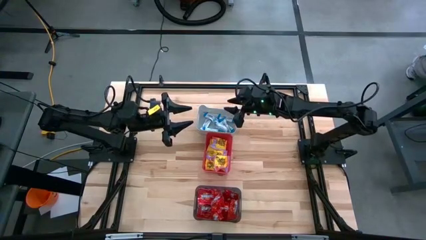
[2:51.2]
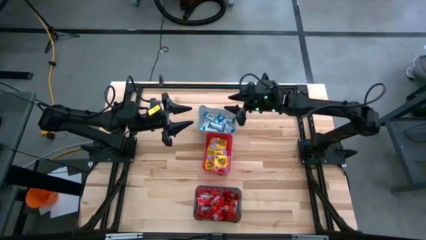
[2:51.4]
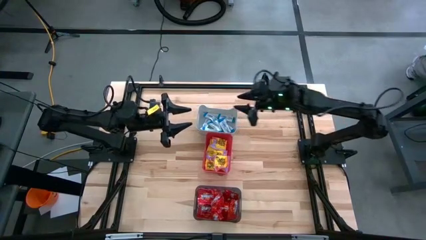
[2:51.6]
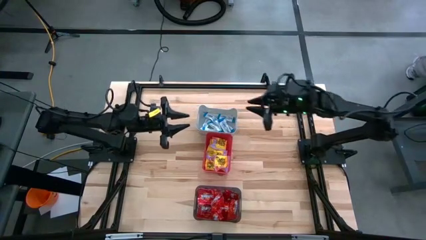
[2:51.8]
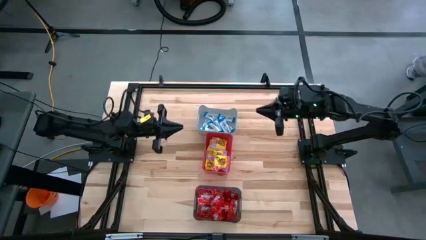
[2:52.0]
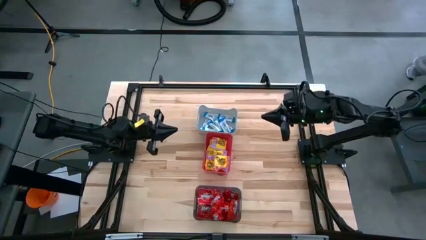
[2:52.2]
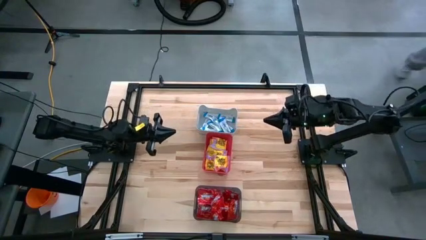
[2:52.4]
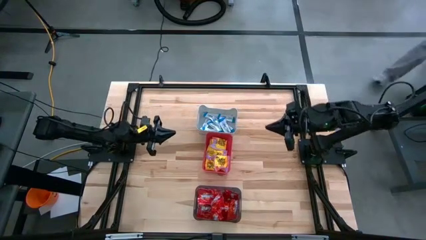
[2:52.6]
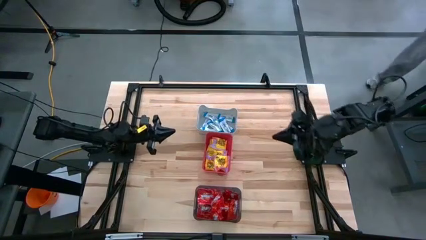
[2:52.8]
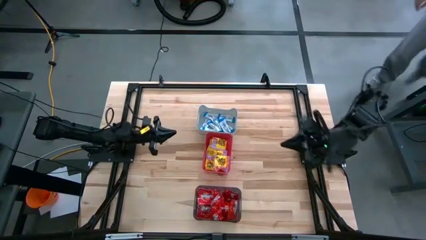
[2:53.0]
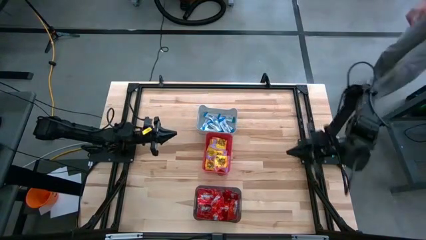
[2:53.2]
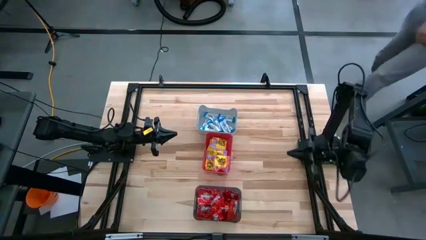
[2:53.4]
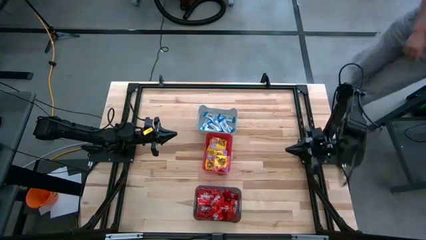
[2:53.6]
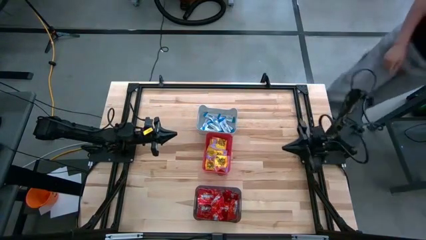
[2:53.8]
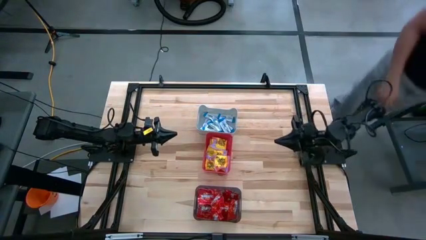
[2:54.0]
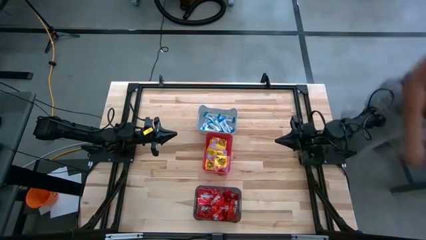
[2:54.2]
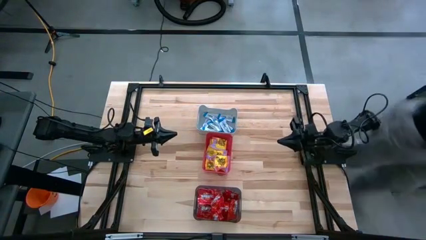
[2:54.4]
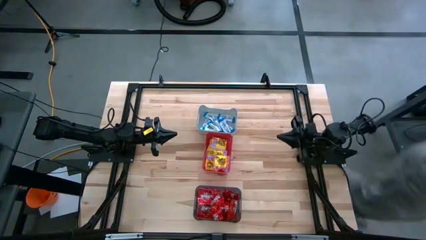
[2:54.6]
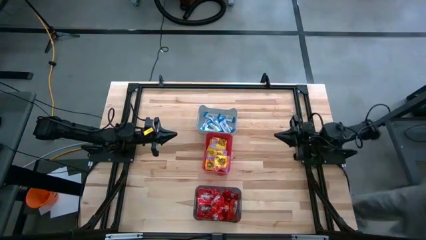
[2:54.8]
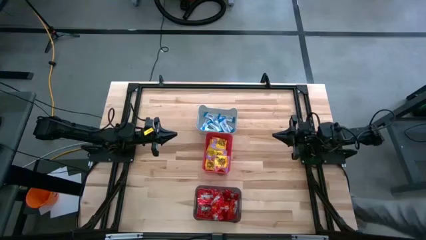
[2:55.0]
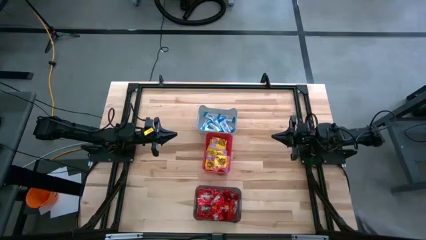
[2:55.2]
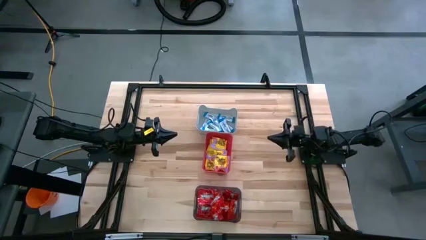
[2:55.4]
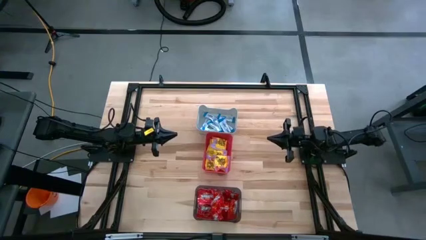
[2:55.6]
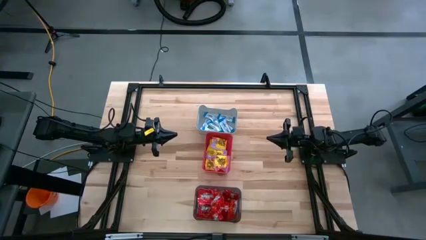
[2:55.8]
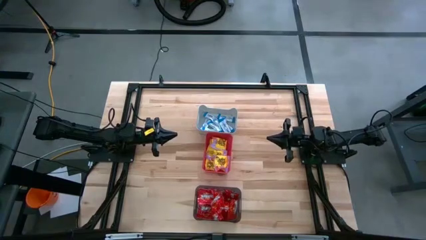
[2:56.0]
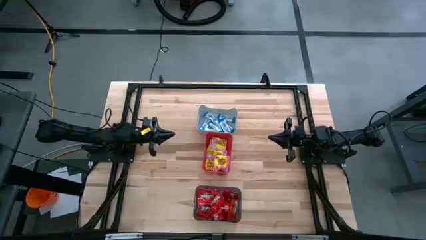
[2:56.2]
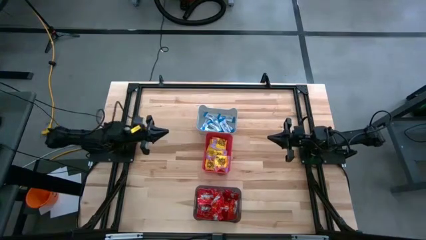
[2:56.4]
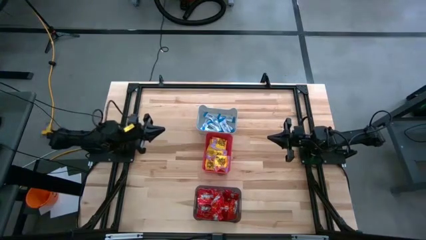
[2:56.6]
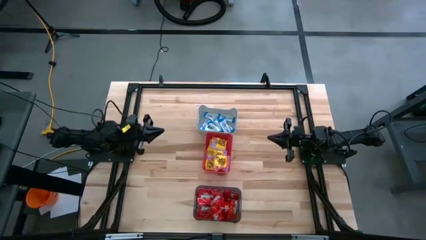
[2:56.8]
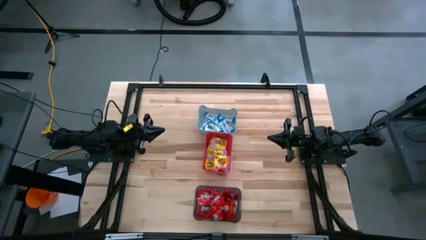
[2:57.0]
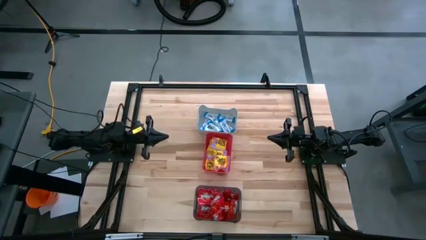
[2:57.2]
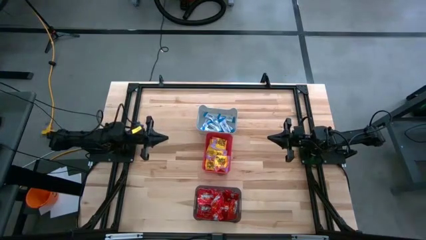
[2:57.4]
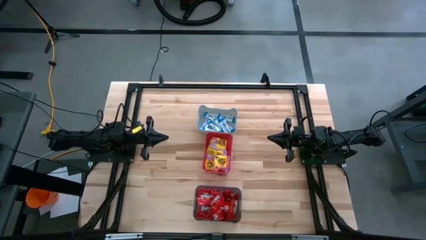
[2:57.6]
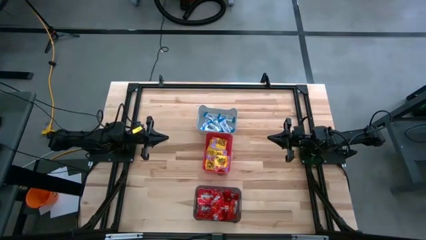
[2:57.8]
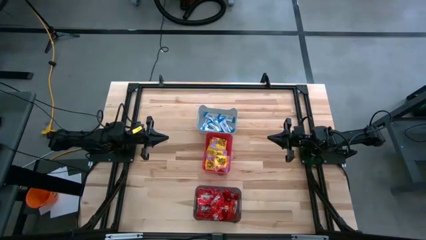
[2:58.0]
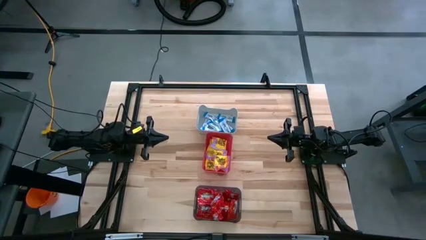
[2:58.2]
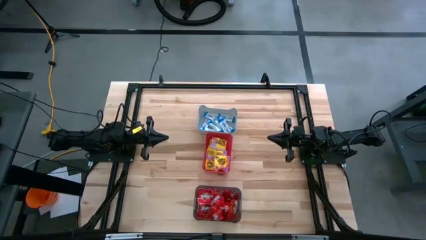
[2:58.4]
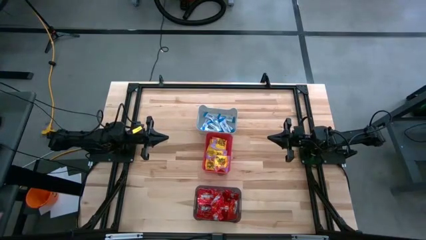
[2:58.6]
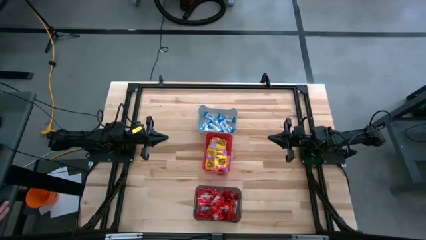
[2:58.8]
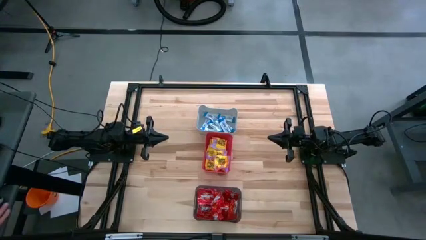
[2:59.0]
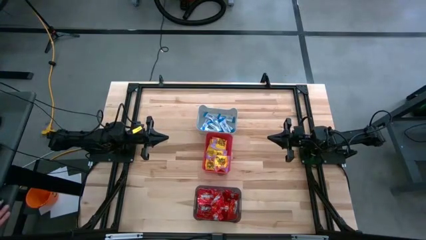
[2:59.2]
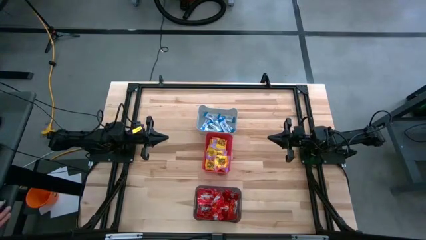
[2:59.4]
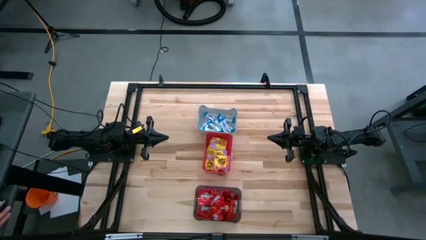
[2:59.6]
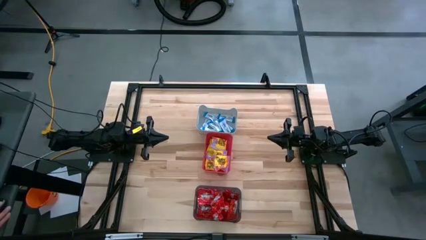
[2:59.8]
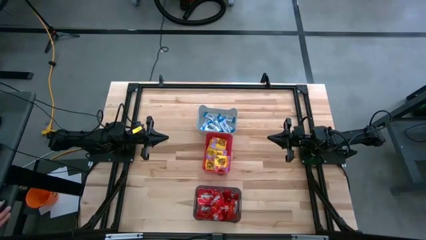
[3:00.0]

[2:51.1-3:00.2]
Task: Sort candy
Return to Home Position

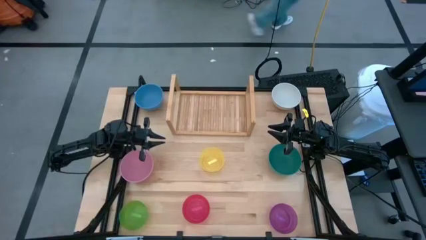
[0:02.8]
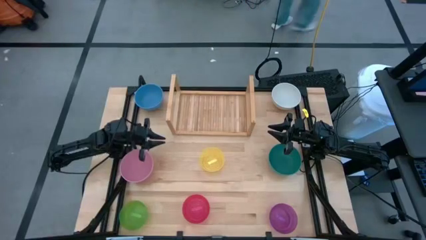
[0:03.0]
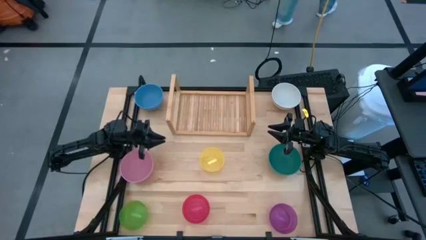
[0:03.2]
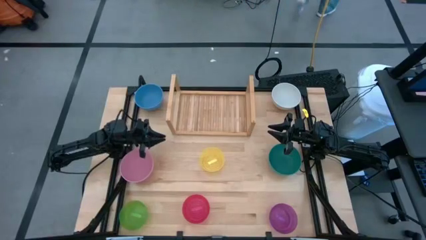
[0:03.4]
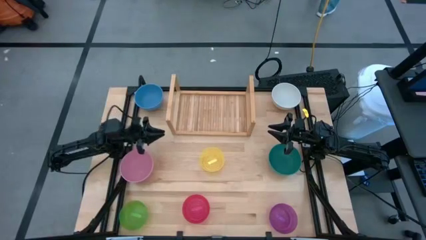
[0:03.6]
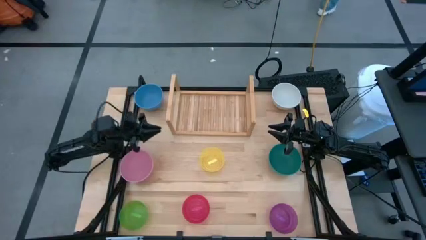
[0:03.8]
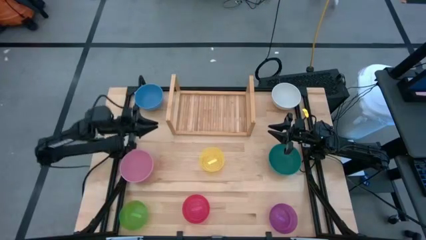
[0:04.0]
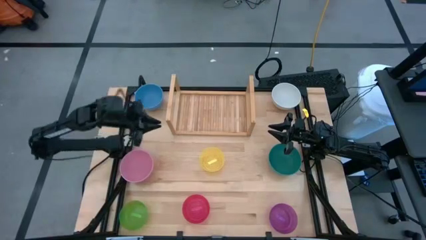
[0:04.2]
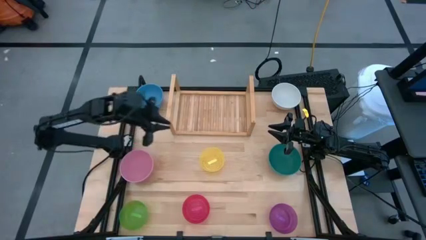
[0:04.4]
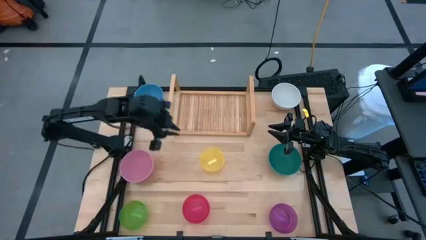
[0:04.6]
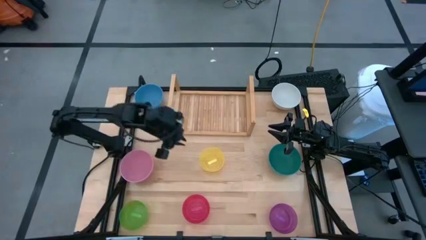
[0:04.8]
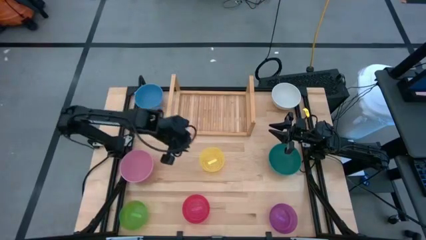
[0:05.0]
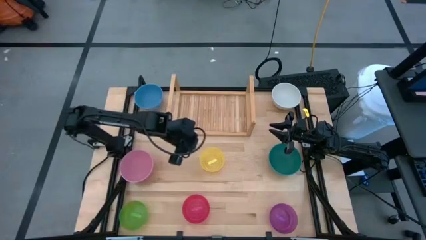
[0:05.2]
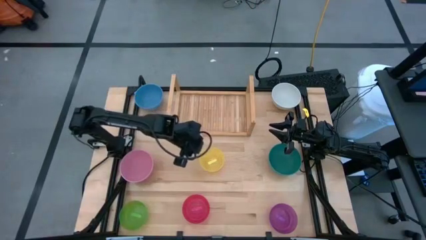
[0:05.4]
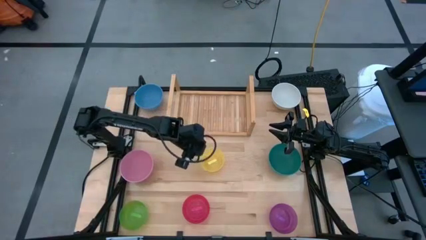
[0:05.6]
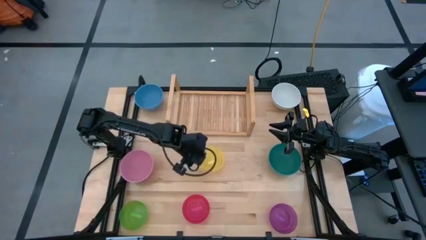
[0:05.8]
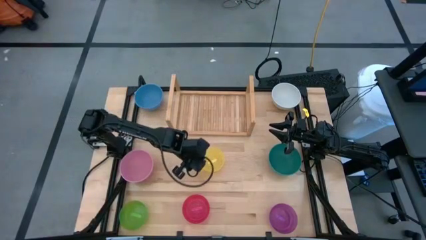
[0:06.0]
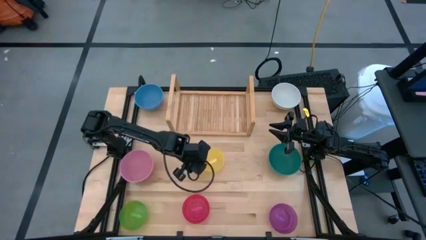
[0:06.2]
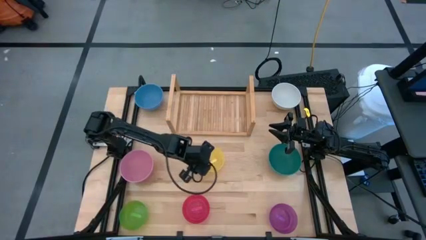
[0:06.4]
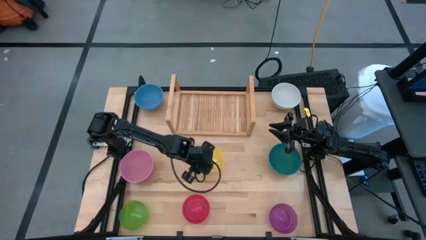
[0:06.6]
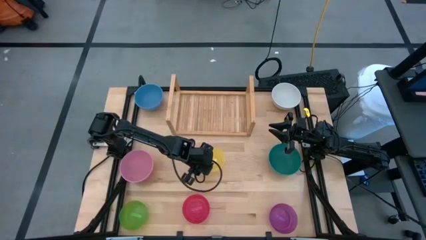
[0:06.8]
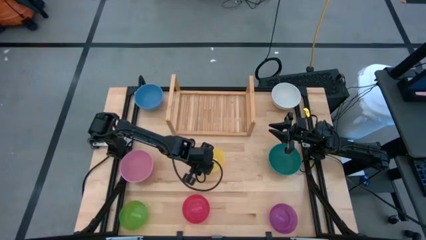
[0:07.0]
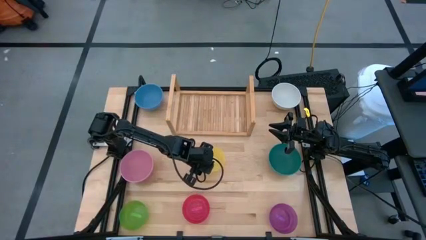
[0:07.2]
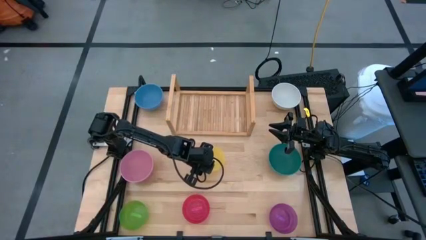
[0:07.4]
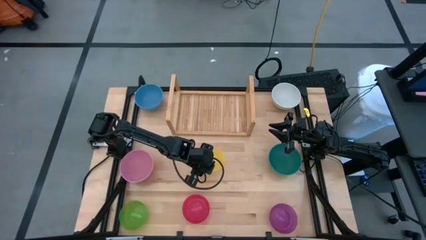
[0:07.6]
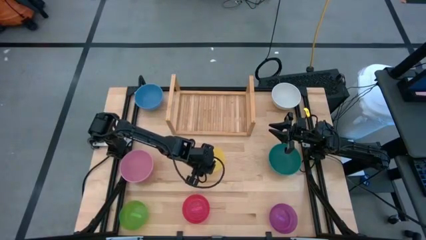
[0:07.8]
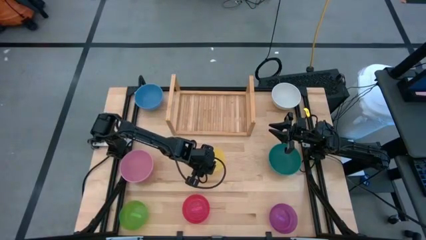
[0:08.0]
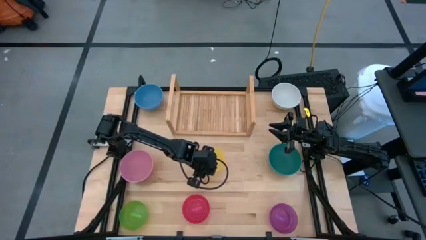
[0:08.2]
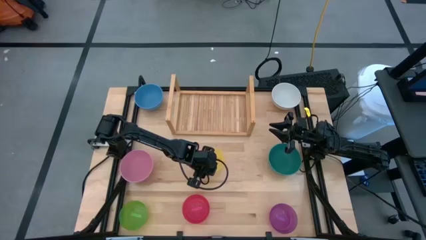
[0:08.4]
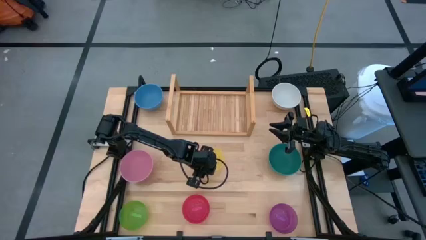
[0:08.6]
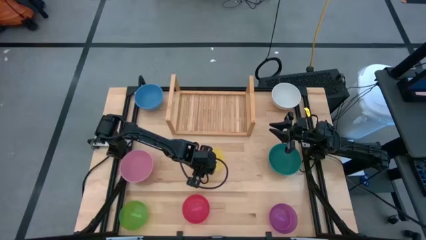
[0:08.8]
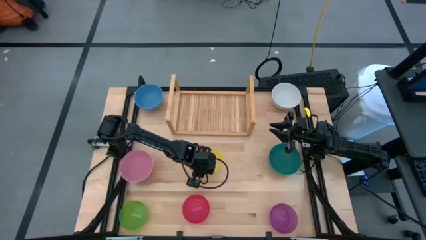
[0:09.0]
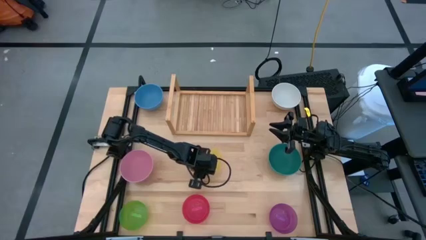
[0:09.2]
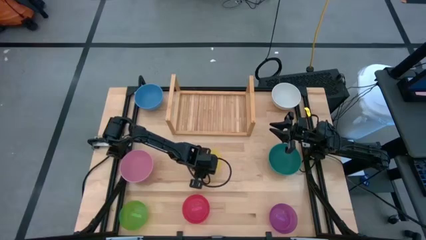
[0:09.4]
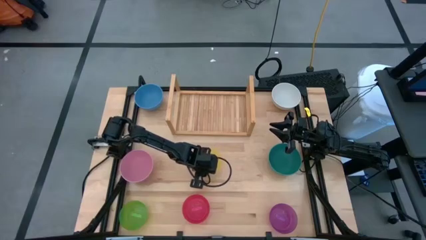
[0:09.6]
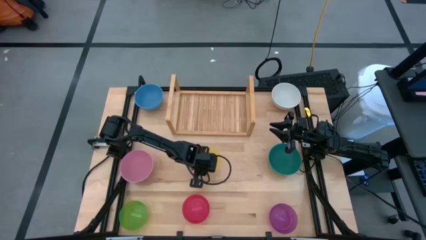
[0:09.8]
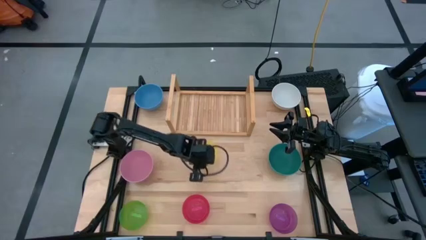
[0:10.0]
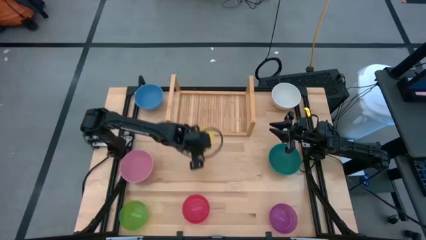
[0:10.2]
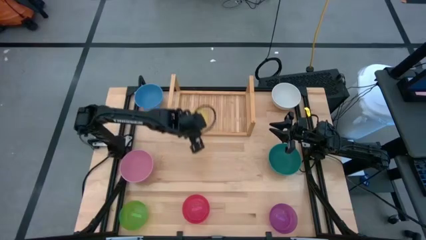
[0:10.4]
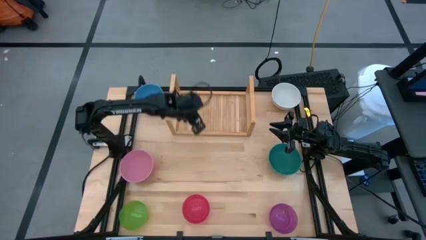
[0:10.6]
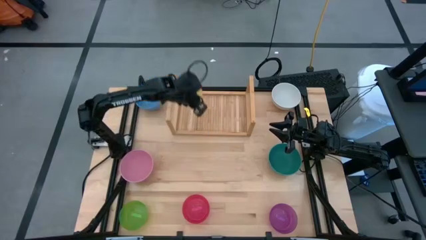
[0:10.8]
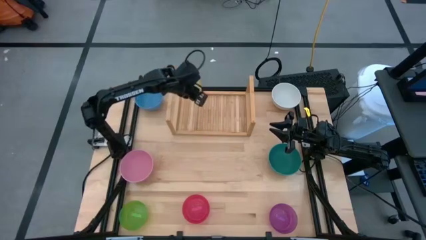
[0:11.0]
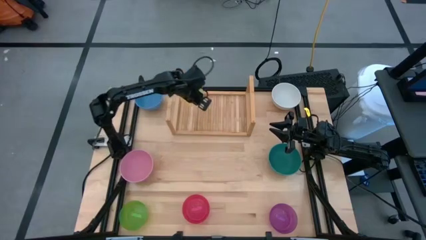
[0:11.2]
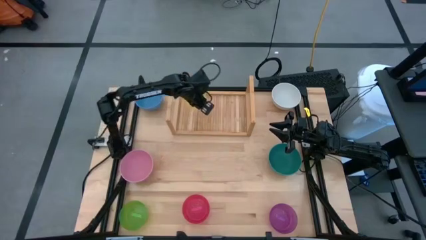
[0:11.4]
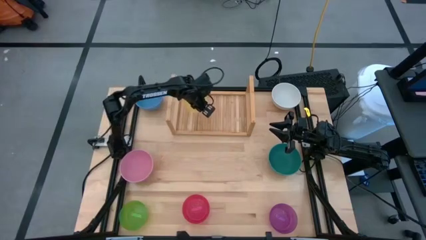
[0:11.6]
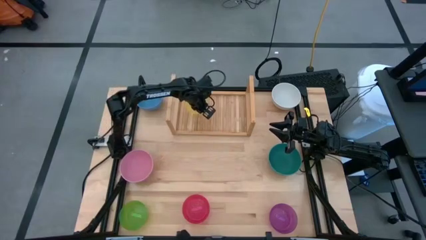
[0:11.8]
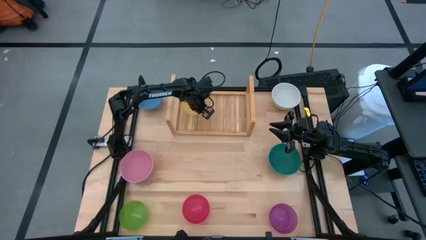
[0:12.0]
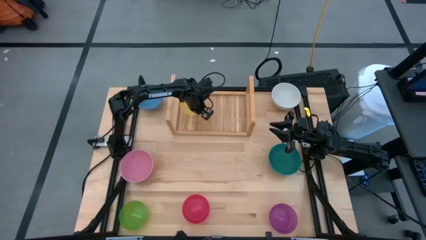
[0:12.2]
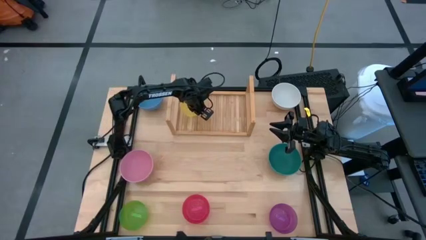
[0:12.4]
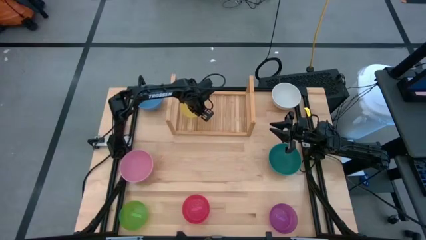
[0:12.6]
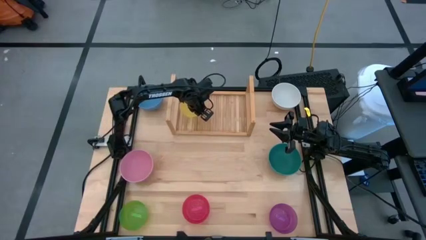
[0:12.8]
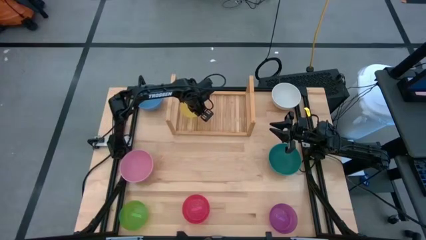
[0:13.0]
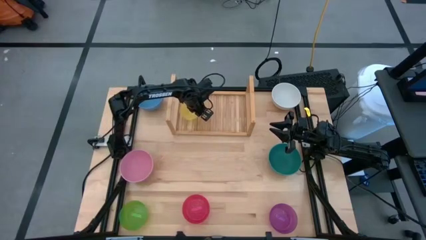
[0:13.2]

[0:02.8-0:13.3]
Task: Place and stack bowls onto a shelf
Put the yellow bowl on the shelf
